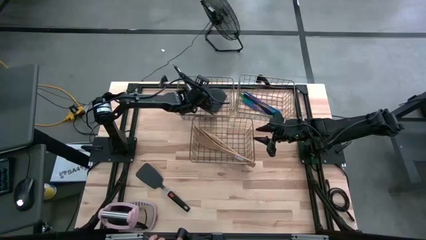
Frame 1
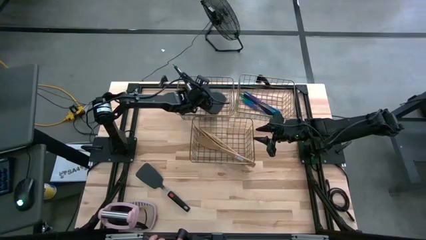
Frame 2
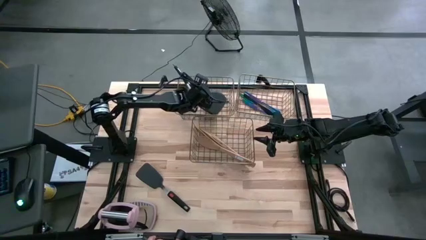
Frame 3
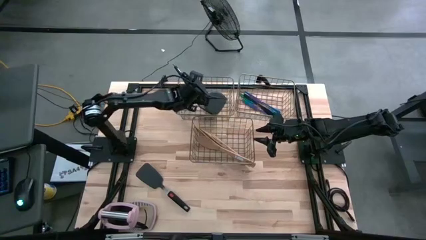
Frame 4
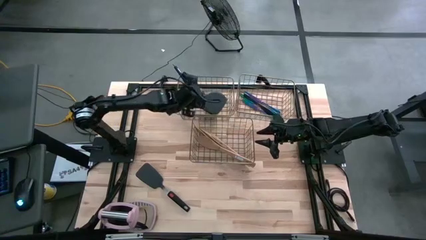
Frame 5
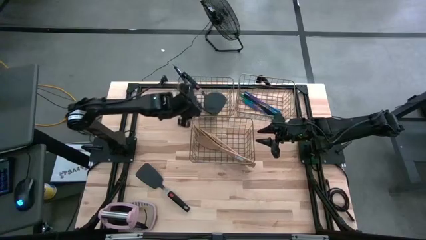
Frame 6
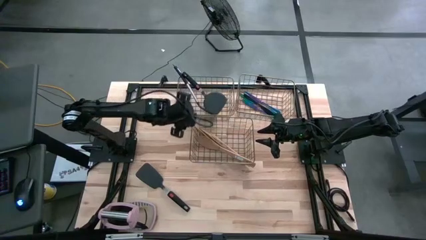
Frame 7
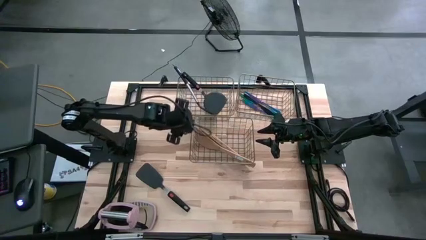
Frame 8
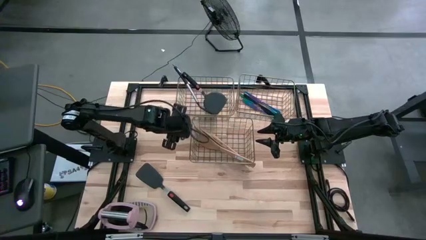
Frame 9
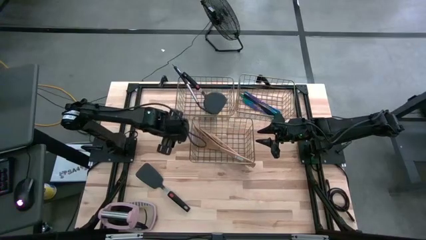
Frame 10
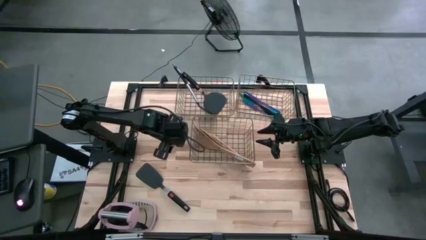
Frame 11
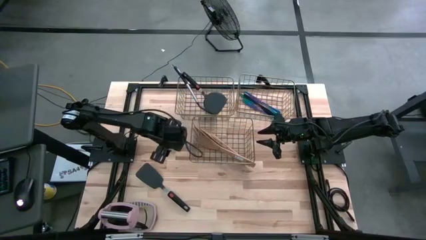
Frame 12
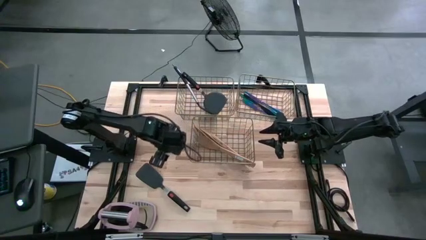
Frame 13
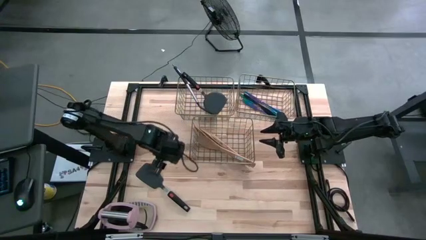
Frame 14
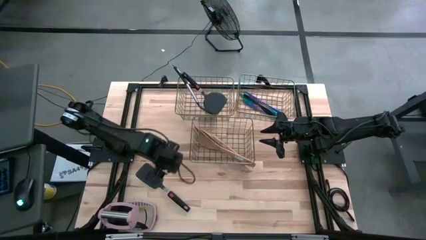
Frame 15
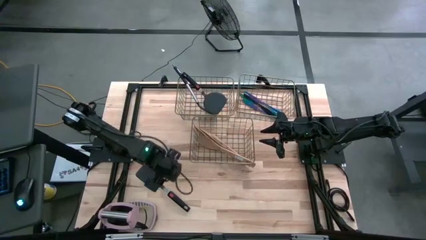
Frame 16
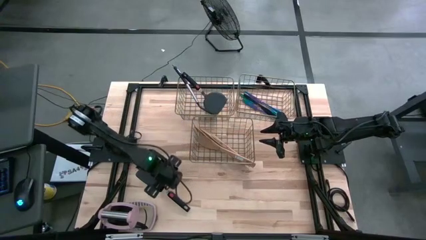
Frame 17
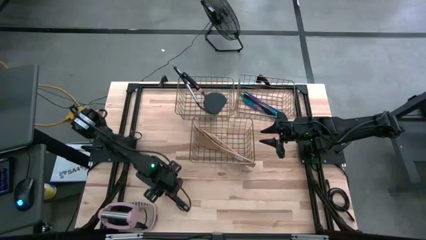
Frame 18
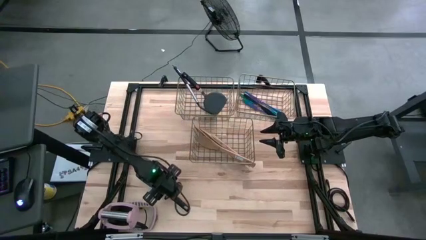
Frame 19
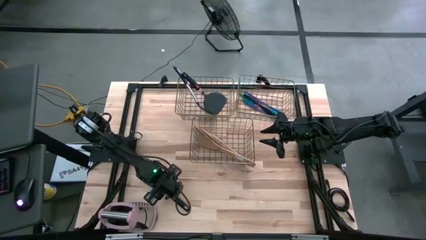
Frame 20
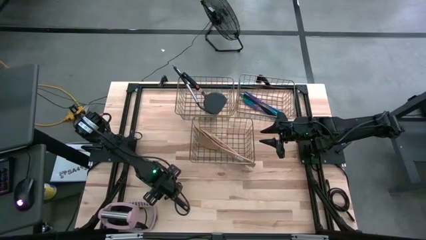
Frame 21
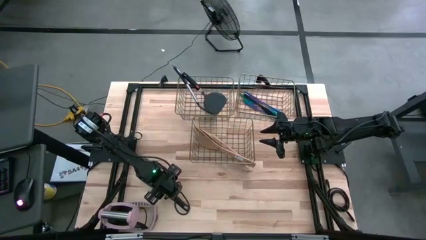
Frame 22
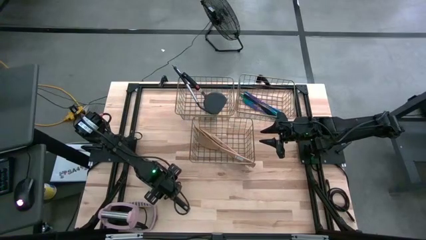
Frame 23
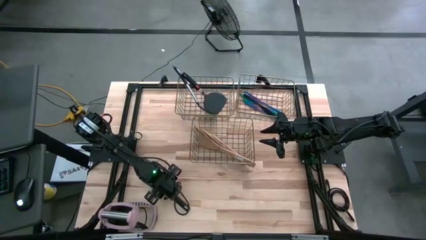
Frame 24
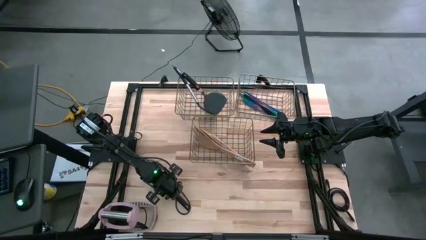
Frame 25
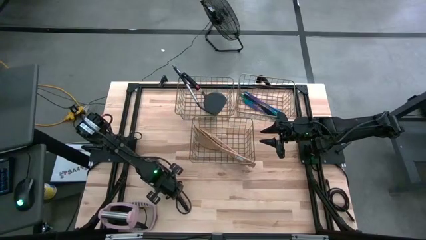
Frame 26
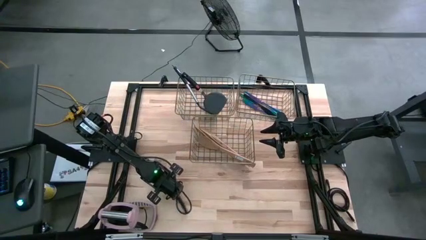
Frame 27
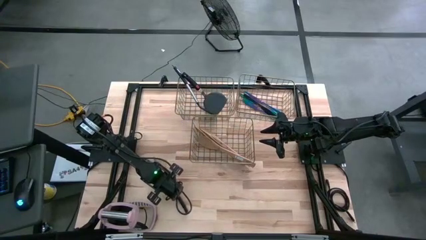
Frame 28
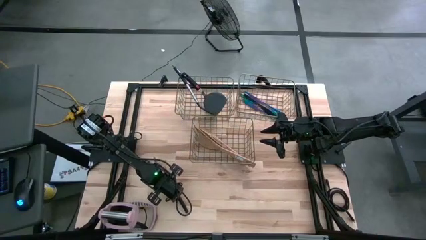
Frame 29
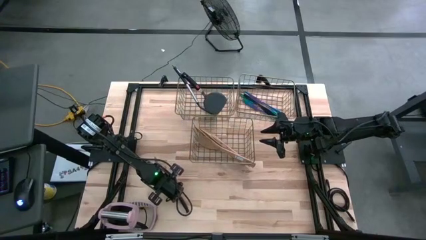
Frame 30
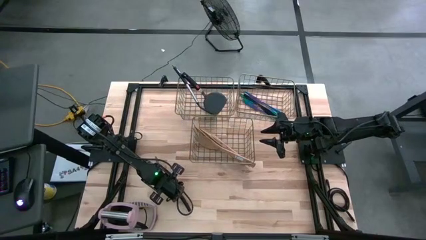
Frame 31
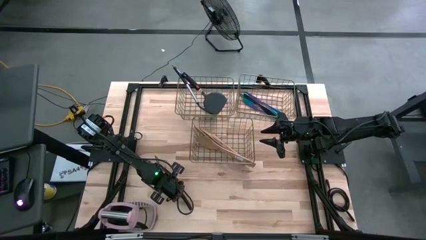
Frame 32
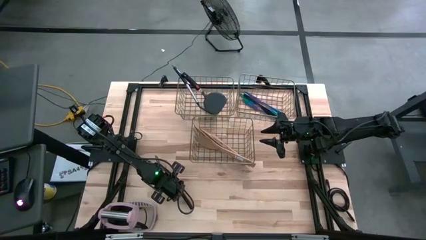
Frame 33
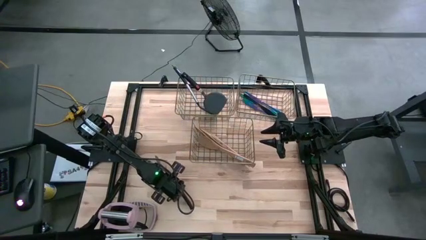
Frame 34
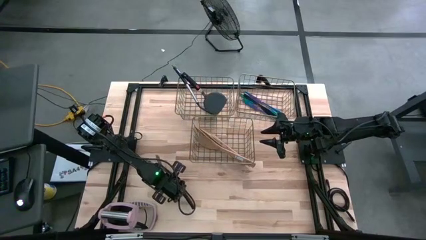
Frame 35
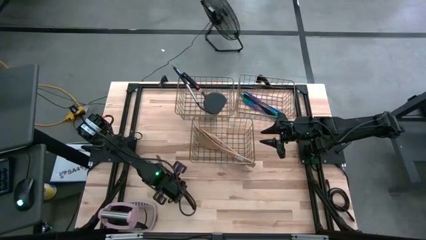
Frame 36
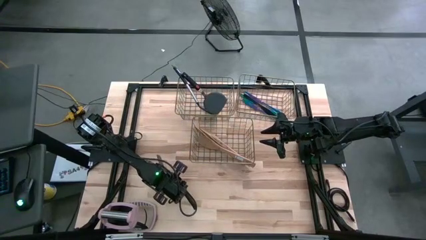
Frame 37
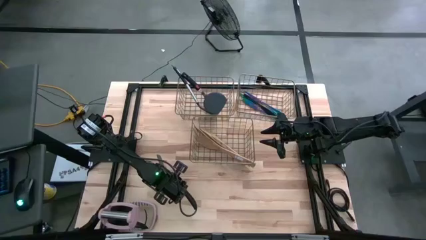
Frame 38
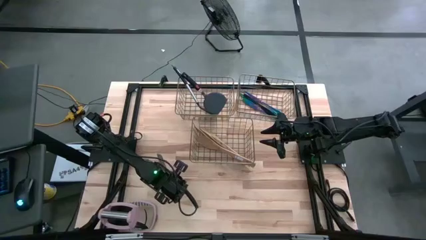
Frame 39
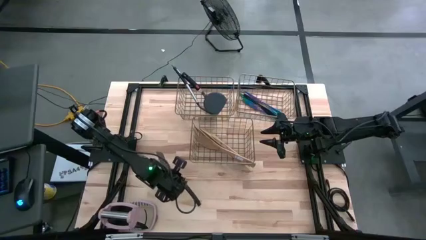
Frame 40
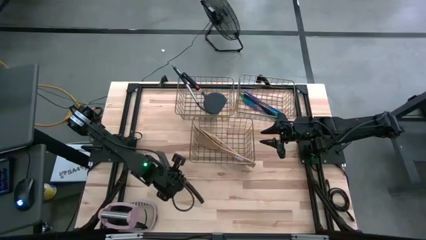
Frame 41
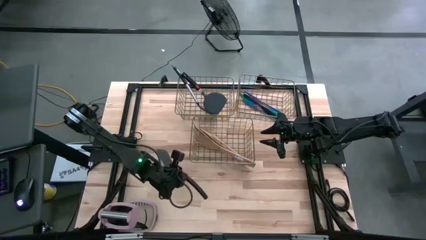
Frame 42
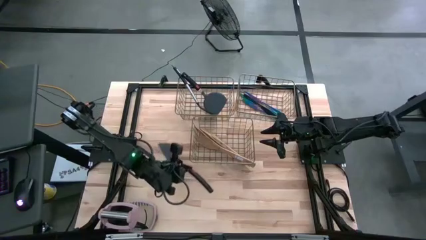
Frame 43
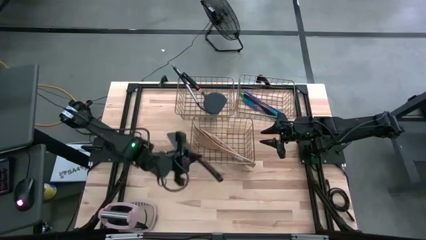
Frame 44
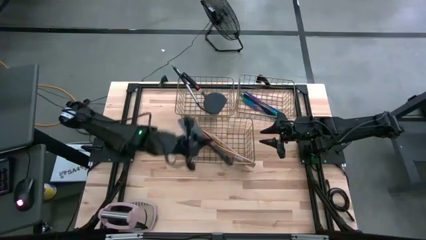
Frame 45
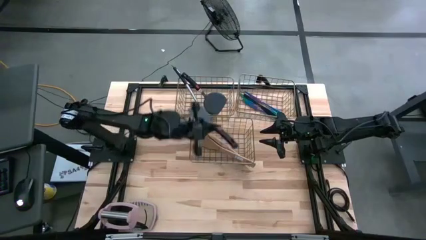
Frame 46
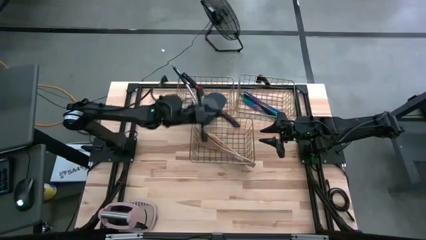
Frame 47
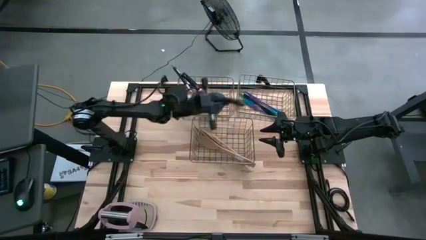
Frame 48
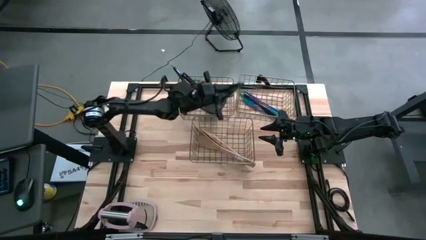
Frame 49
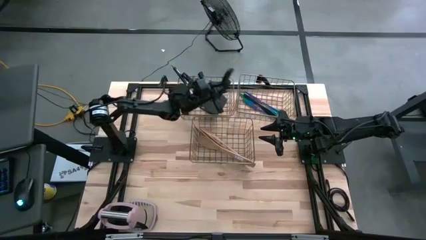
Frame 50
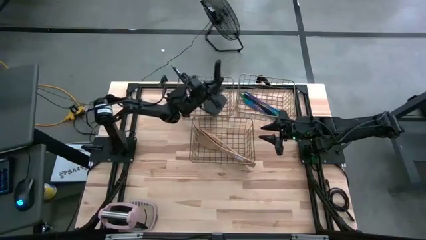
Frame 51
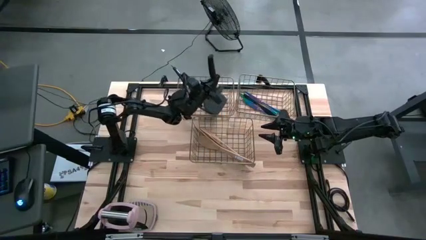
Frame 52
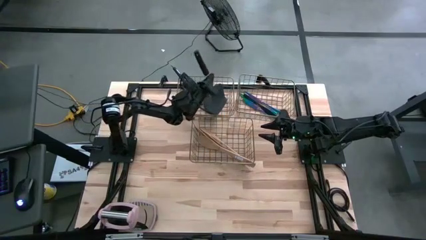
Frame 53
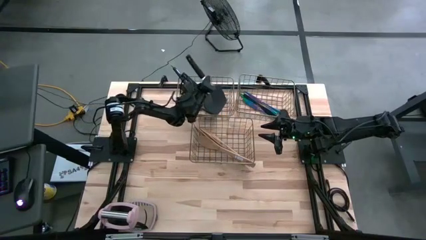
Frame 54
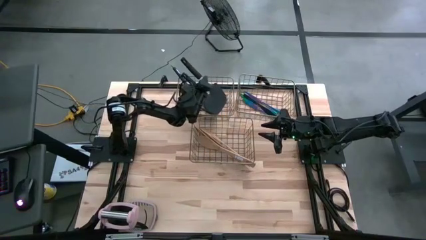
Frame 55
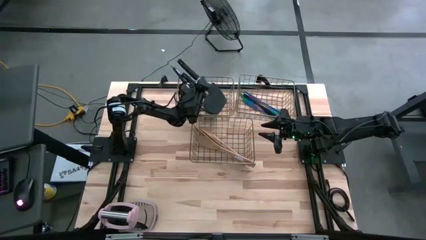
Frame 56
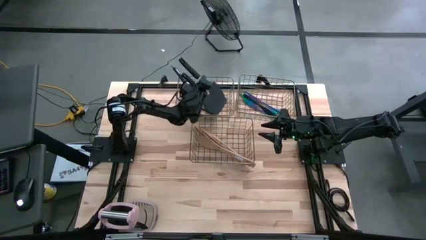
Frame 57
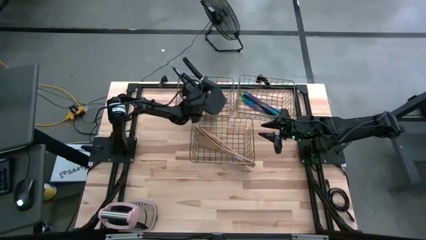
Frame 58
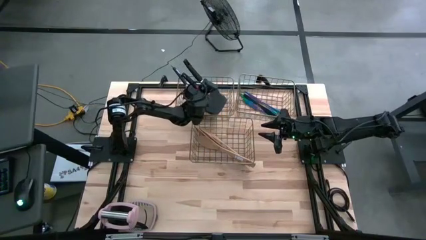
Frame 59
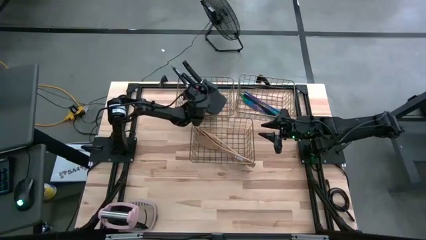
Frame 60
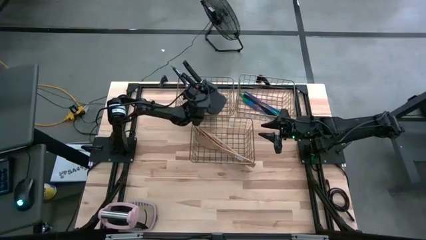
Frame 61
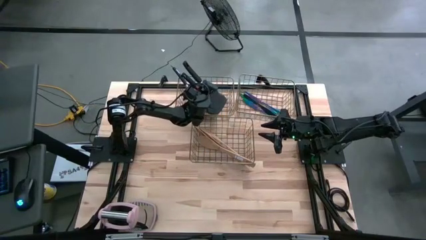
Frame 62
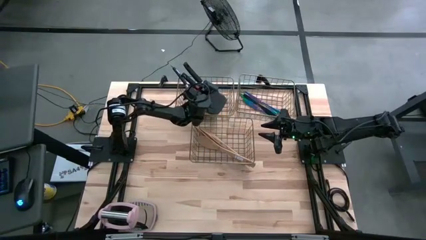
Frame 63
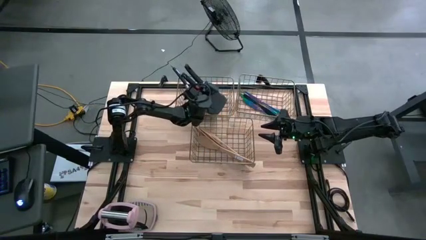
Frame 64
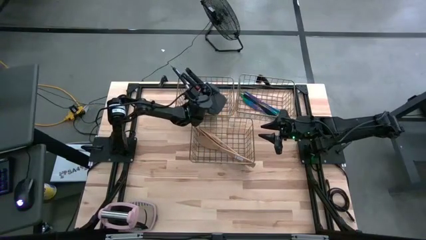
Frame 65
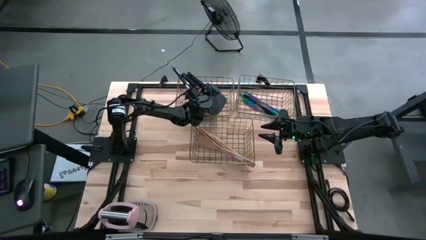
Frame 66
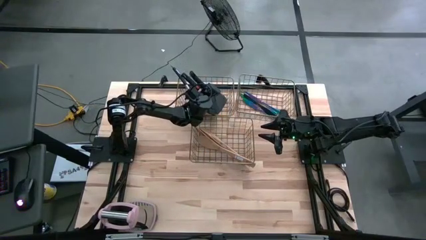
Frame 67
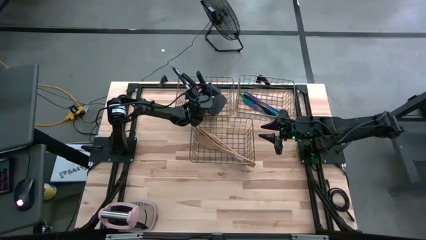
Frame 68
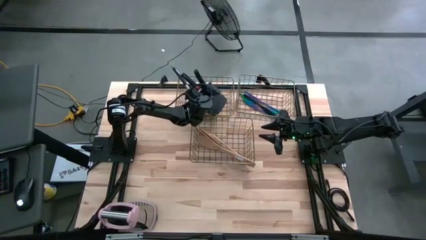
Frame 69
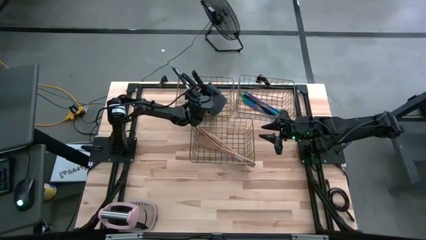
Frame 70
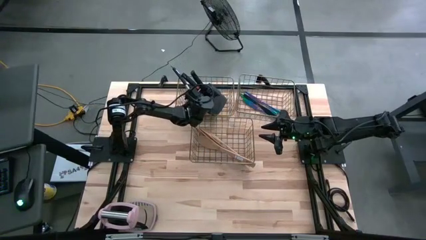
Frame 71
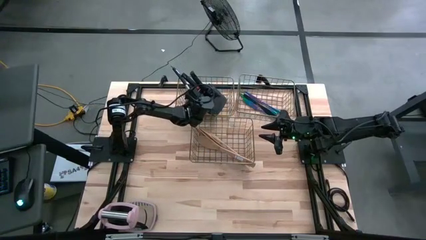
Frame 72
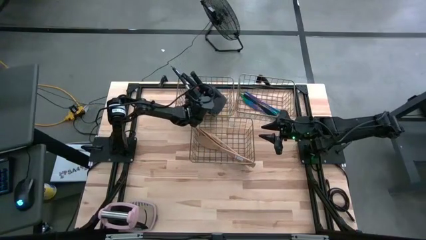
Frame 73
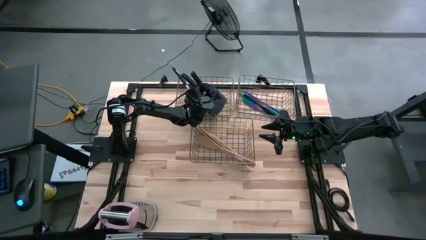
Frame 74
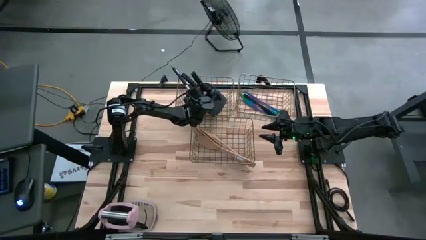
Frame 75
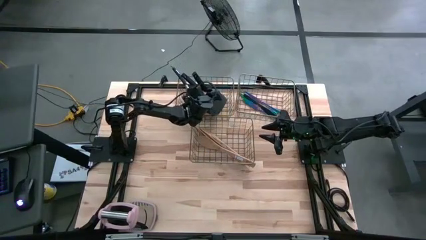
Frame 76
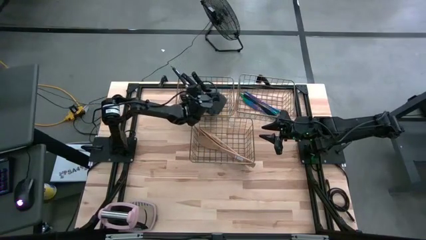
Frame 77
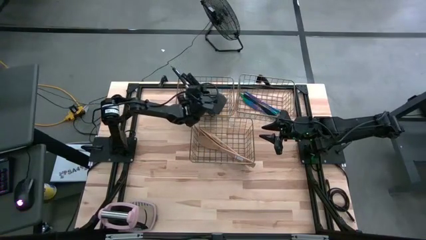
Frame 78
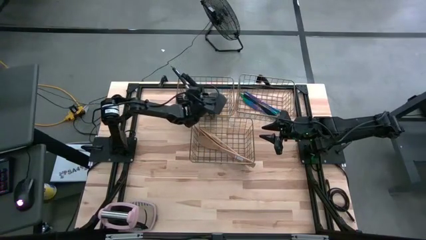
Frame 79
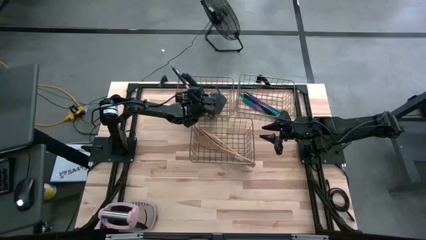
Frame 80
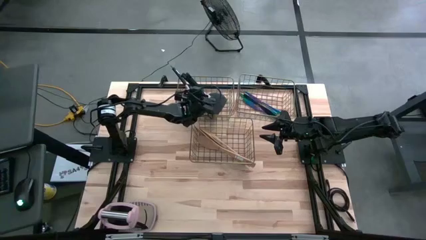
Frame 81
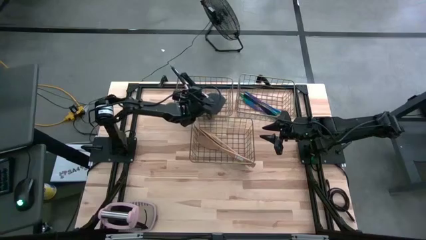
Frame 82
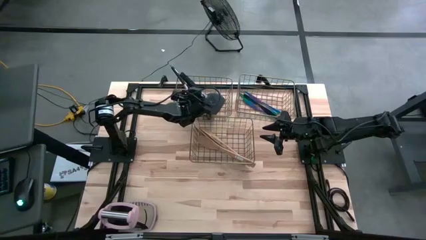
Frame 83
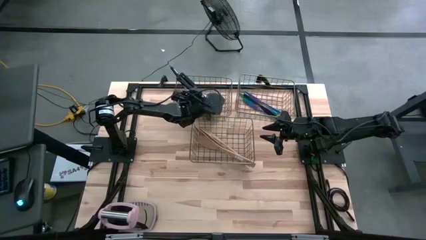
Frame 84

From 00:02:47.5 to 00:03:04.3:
Task: Pick & Place Kitchen Items
Put the black spatula into the top left wire basket
